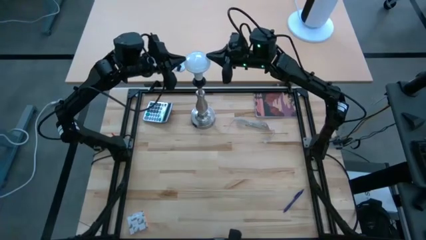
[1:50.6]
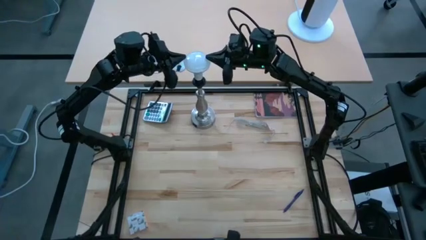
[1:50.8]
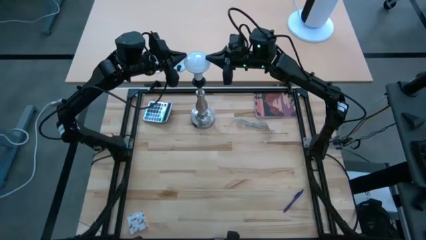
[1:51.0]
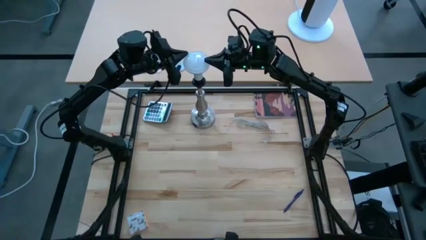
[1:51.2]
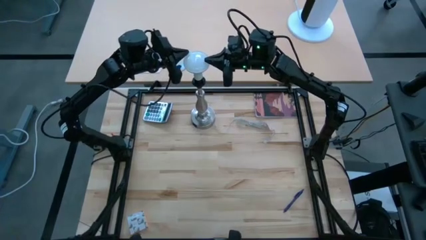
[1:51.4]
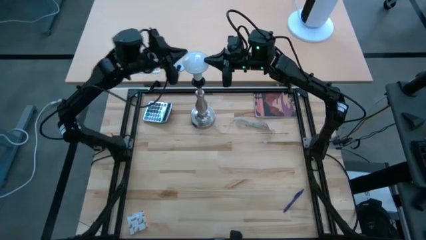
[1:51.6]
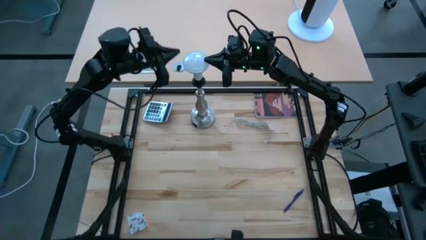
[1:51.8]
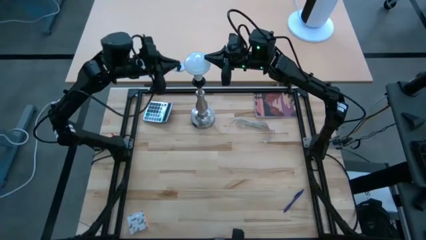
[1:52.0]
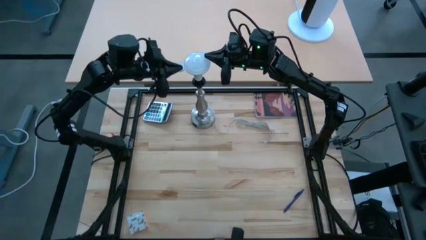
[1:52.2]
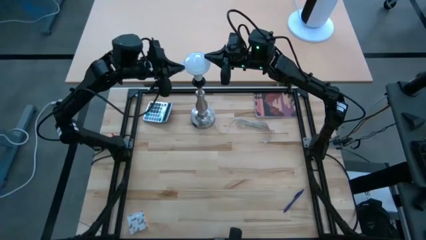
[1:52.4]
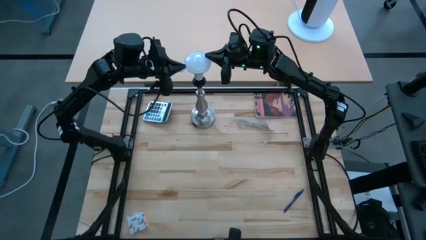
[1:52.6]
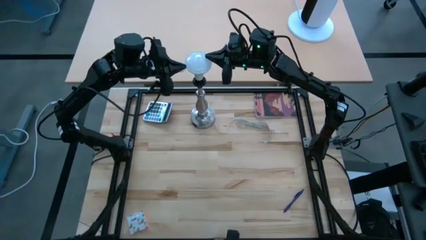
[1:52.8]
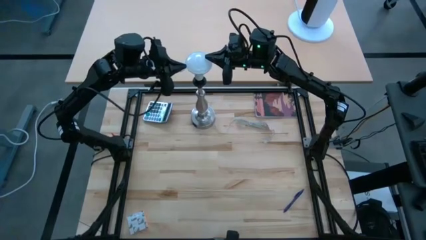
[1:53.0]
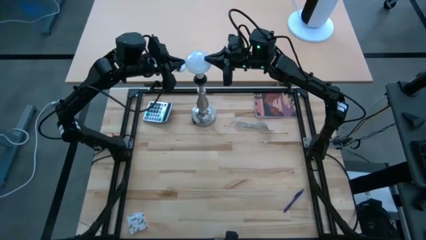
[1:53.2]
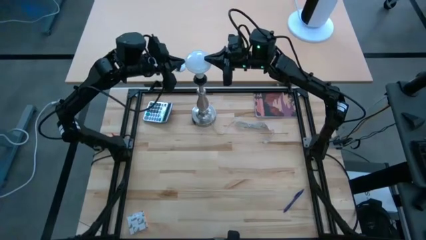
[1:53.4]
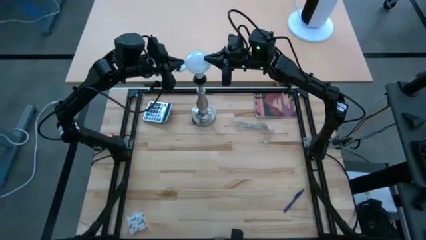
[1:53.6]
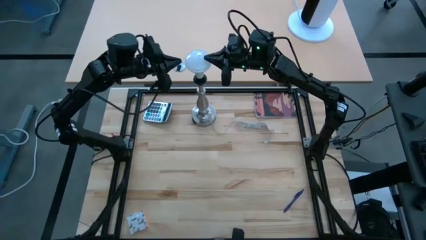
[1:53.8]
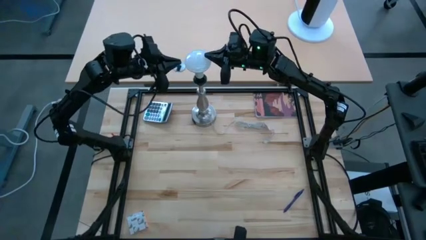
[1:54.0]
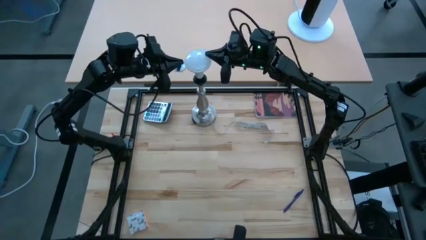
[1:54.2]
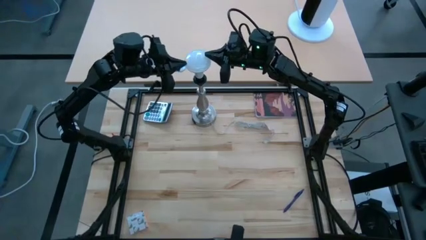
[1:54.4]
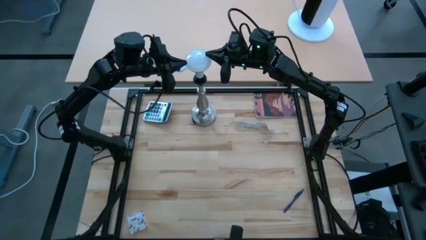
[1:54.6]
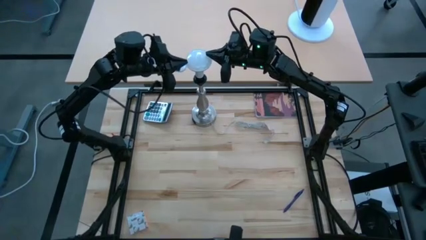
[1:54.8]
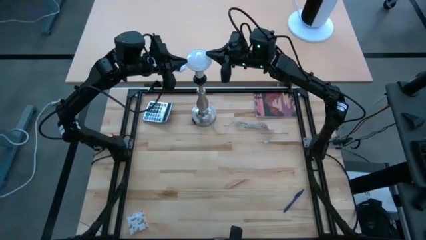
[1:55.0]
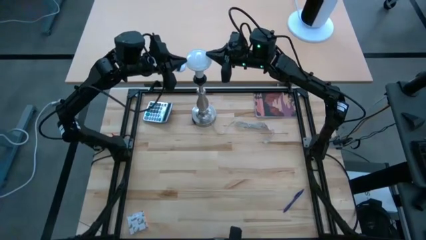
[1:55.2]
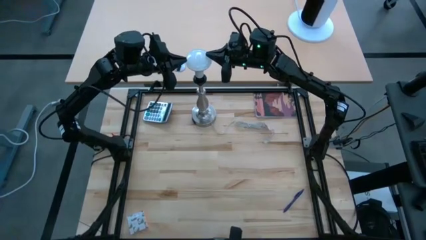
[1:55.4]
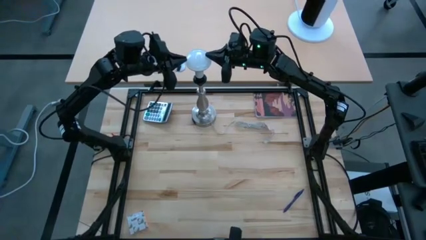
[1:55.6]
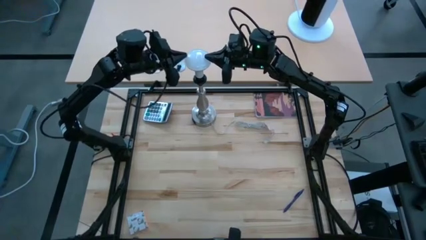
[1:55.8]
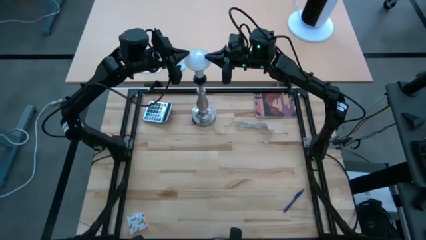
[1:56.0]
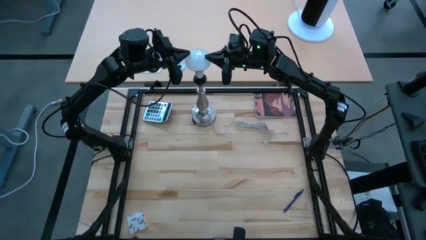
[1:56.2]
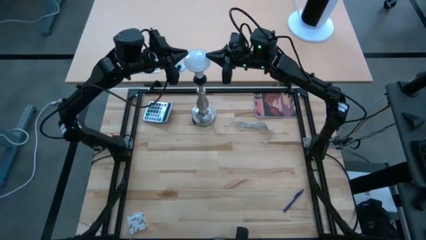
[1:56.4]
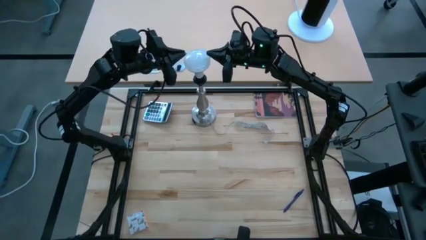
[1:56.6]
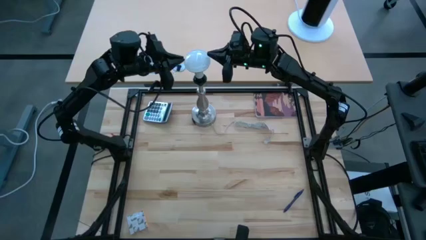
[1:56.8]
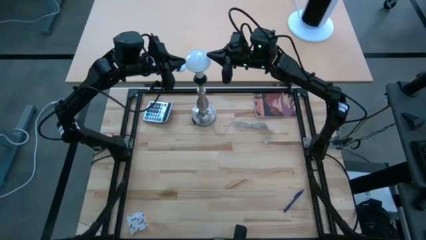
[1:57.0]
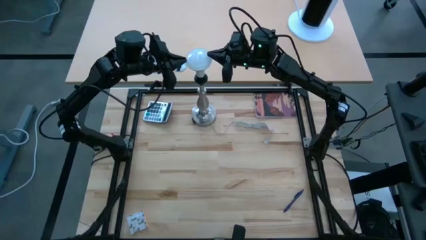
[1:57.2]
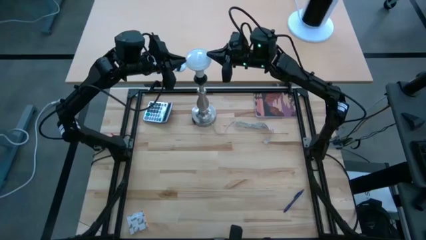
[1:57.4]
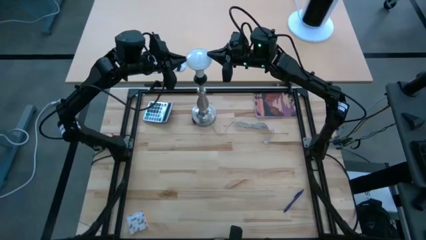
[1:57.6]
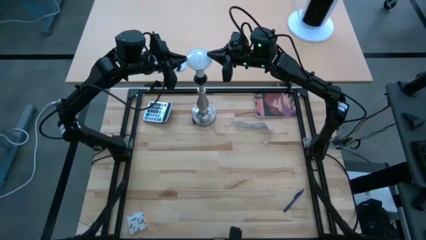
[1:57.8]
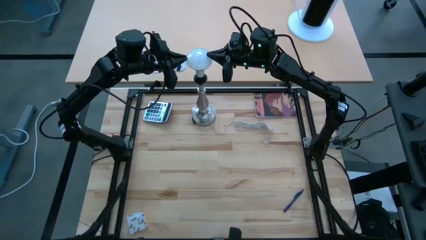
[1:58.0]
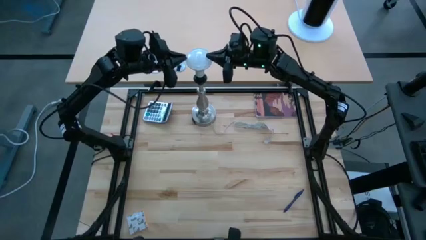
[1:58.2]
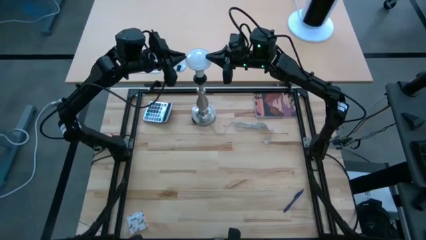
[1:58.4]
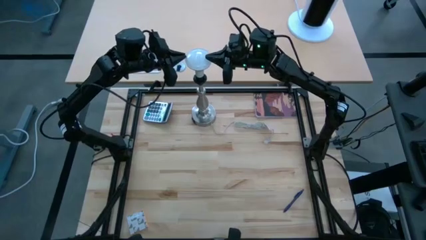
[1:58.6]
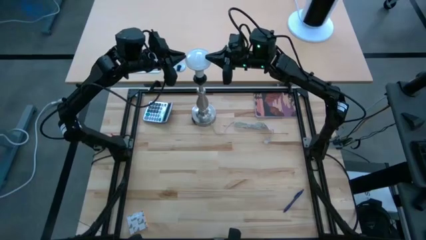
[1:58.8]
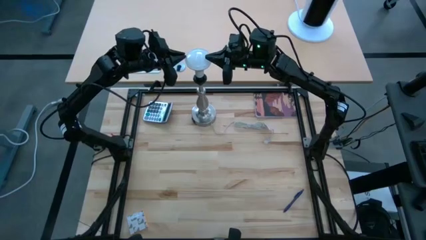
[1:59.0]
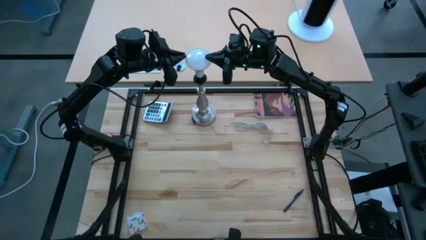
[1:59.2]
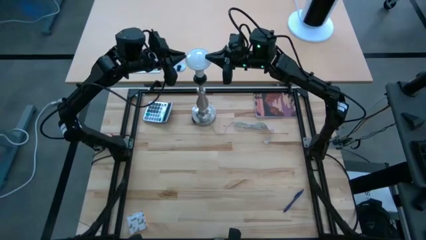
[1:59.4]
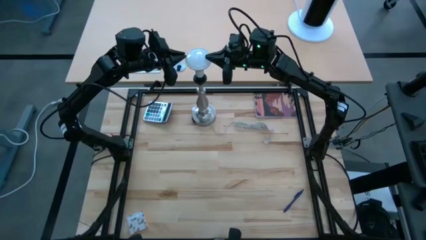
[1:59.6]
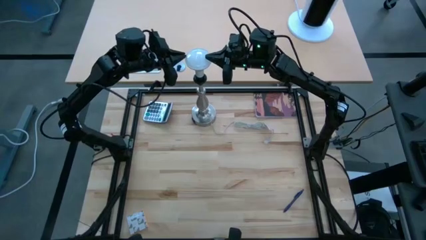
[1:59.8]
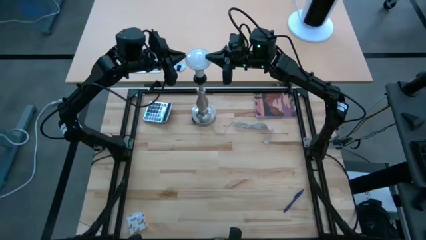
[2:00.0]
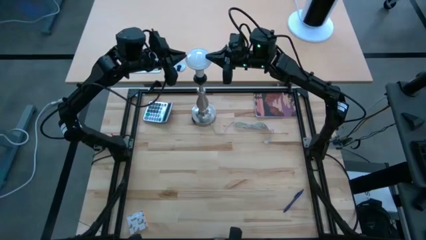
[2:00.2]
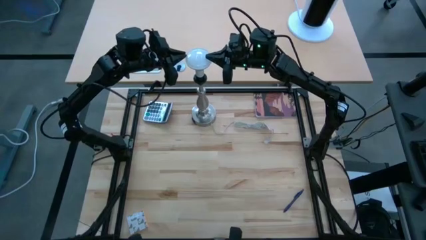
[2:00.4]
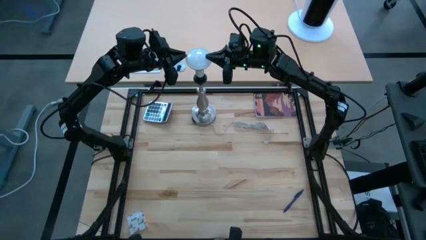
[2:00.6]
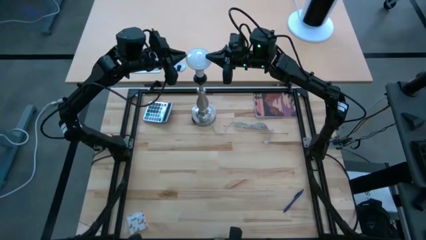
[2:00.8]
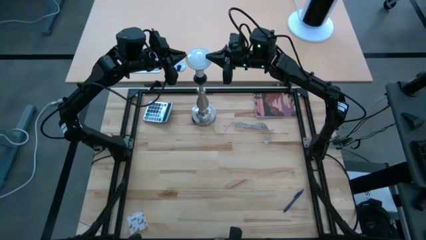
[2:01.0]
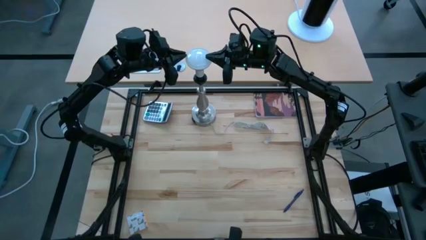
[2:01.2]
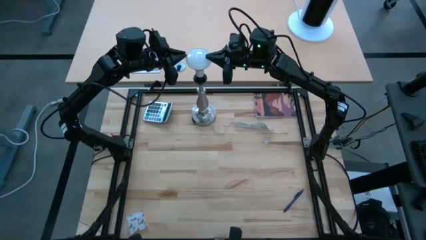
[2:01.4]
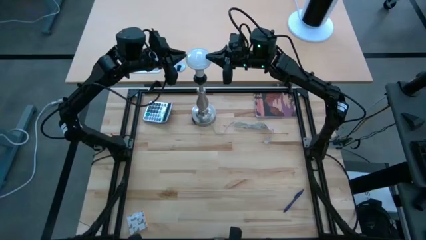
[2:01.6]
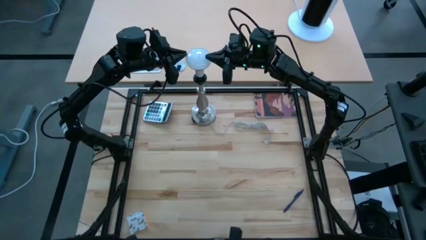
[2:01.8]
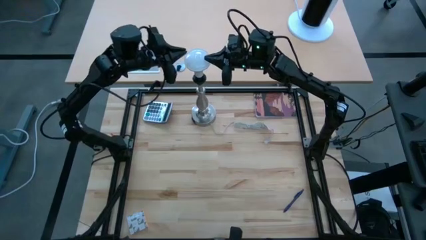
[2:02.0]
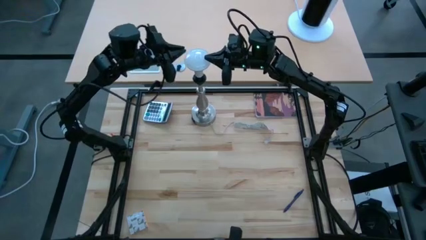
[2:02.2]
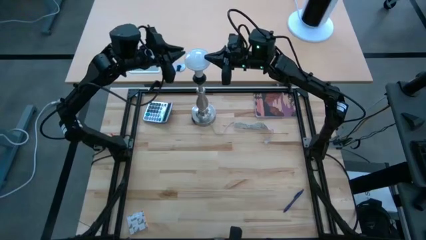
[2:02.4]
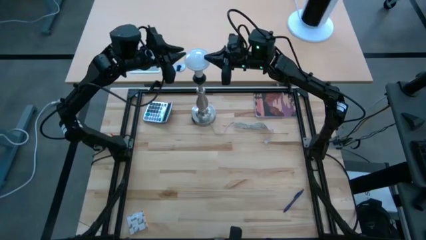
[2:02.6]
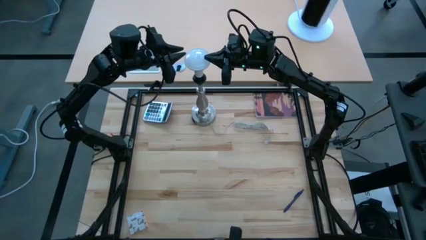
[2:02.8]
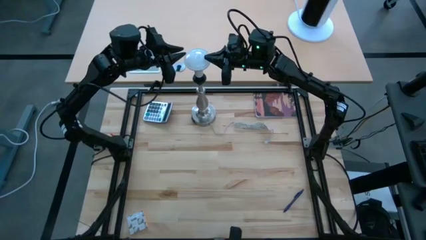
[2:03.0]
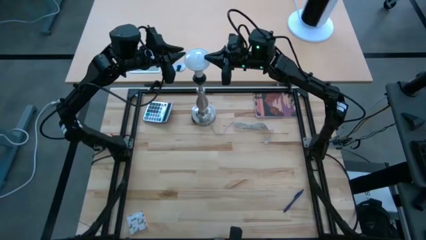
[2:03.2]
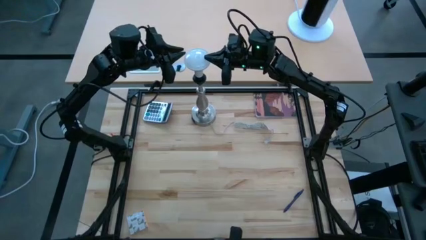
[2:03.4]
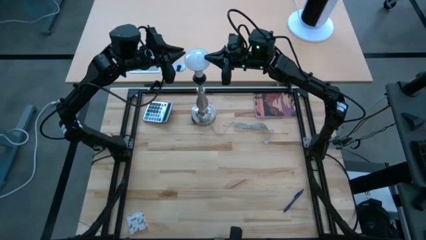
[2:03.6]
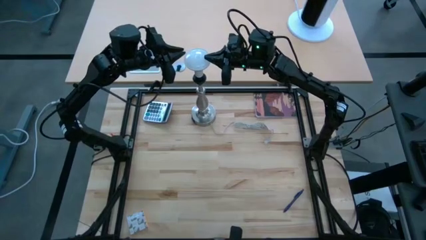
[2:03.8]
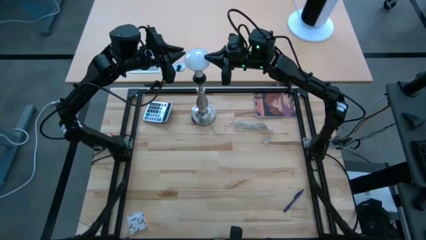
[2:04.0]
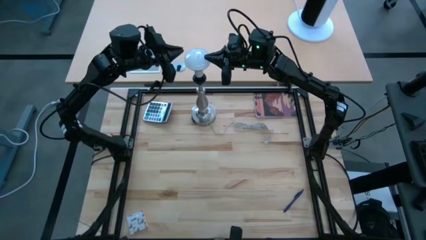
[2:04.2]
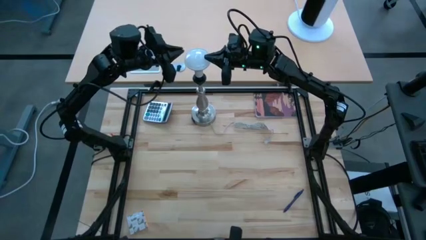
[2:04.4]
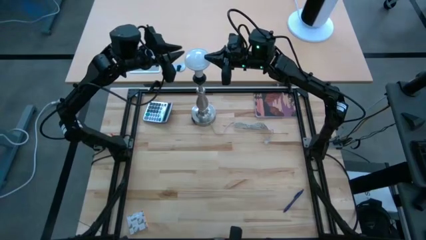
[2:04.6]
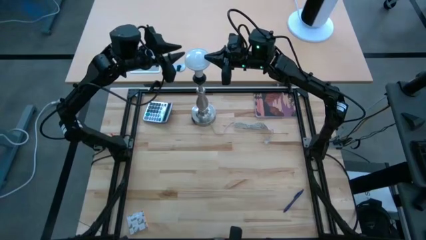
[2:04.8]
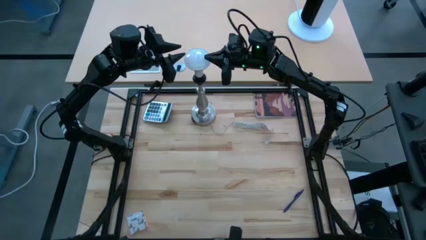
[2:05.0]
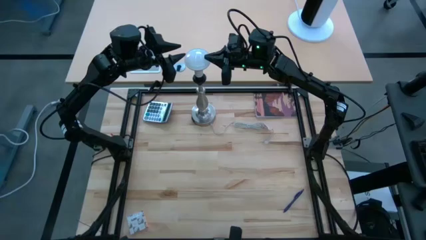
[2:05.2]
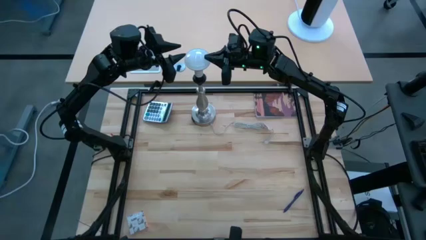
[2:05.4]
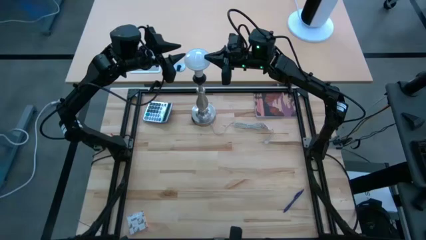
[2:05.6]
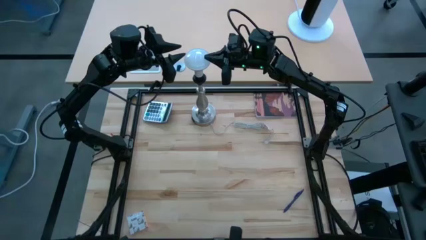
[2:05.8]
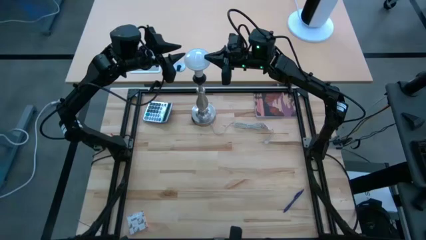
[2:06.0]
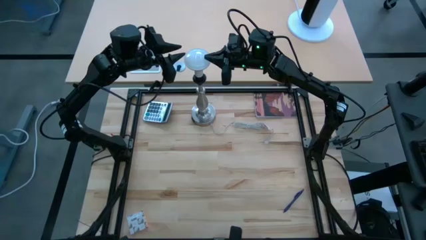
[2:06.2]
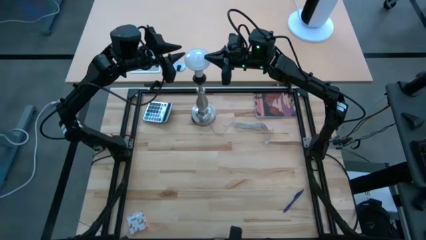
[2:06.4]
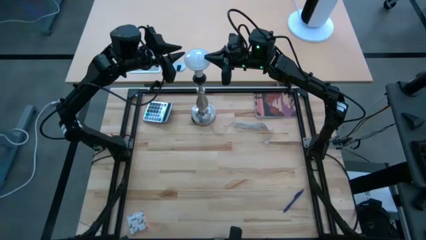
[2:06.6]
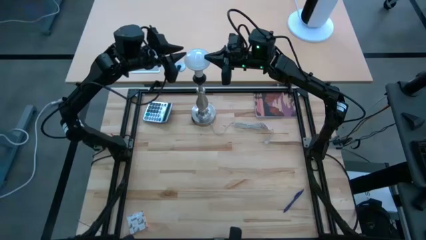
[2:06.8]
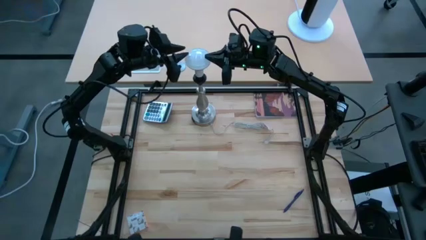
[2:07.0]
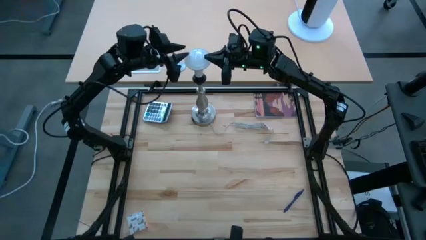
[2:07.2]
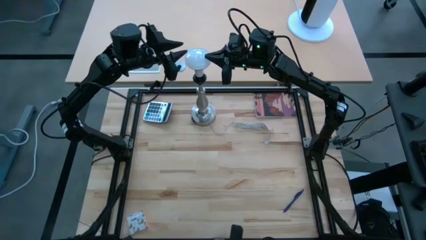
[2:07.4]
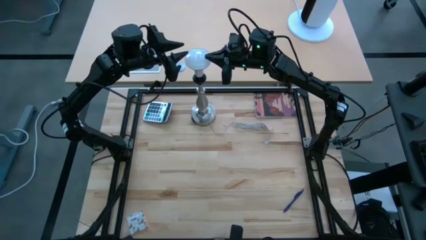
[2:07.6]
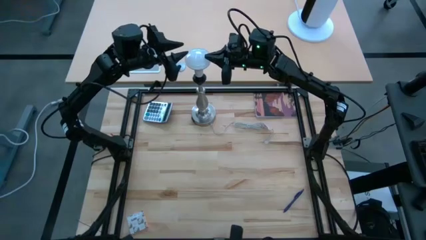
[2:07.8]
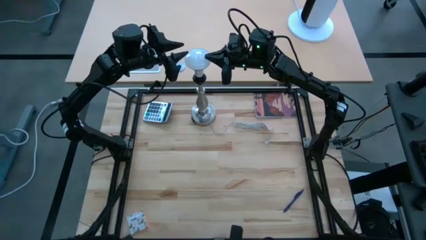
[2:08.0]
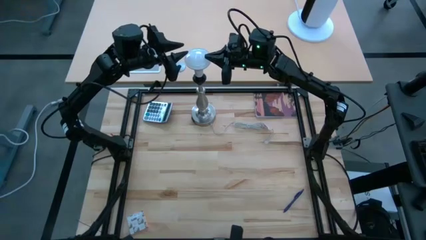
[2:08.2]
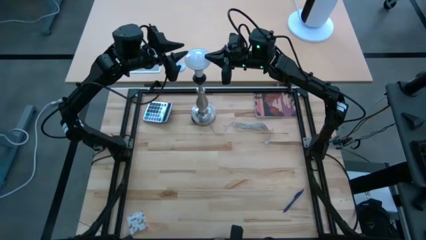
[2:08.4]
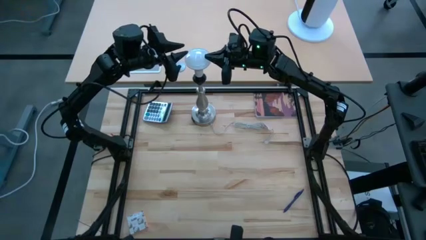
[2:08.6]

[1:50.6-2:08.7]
Task: Screw lightbulb
Insert the lightbulb into the table lamp
